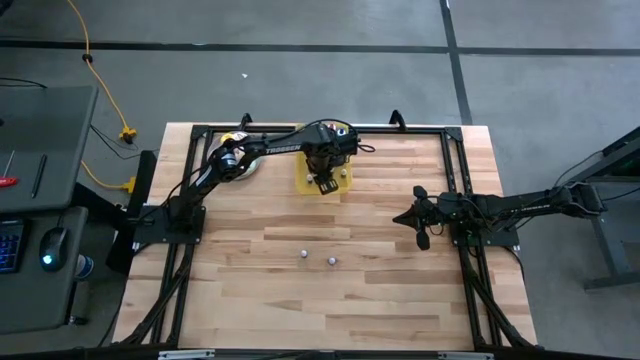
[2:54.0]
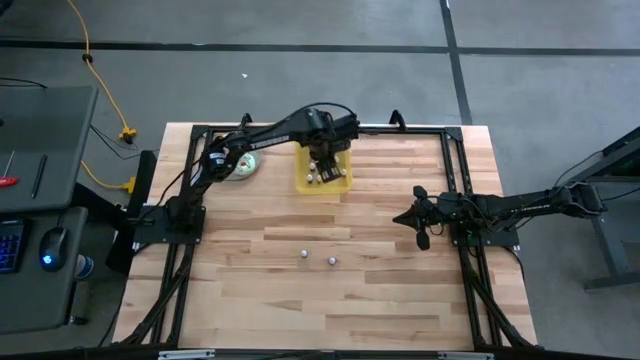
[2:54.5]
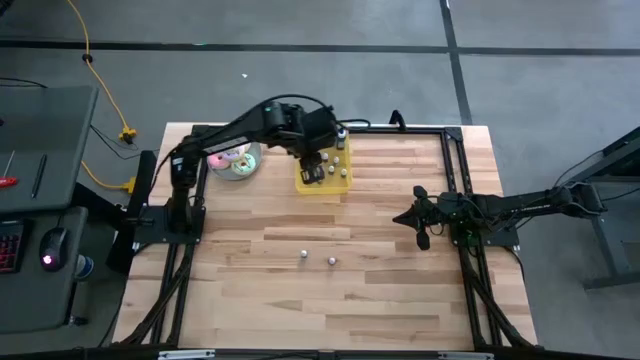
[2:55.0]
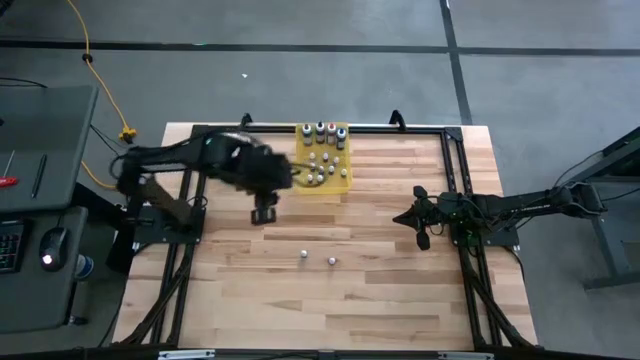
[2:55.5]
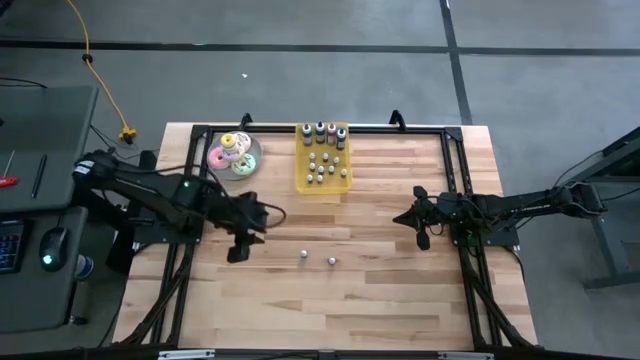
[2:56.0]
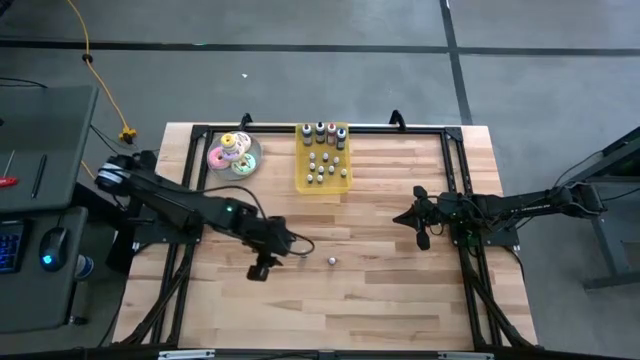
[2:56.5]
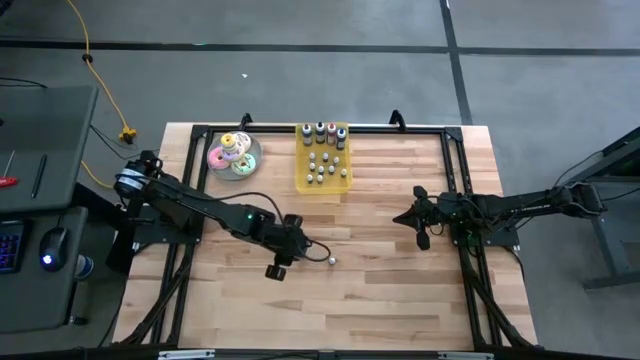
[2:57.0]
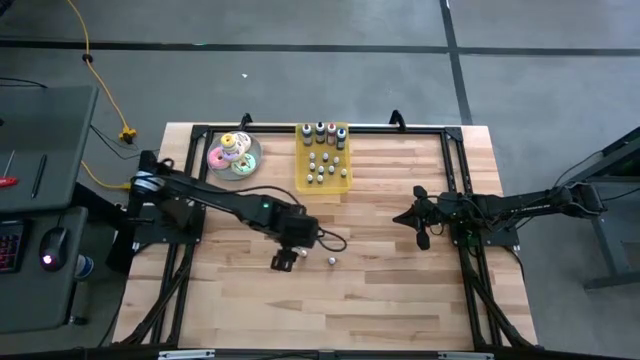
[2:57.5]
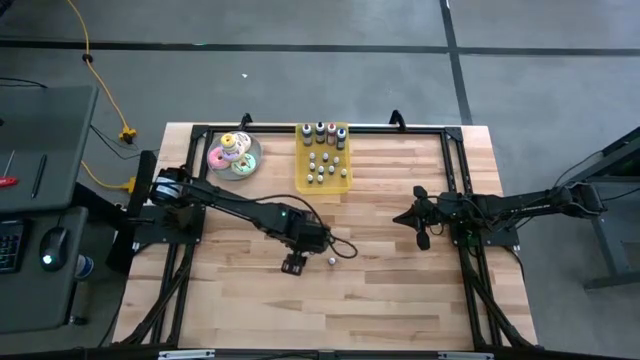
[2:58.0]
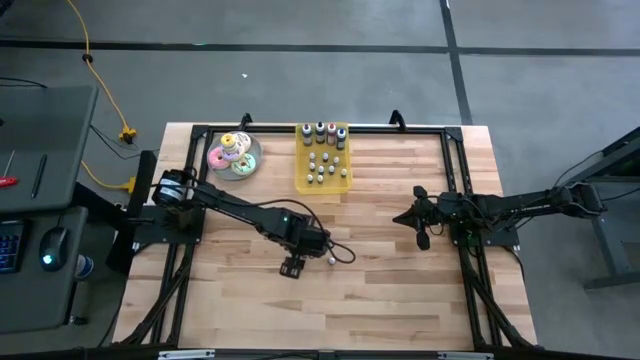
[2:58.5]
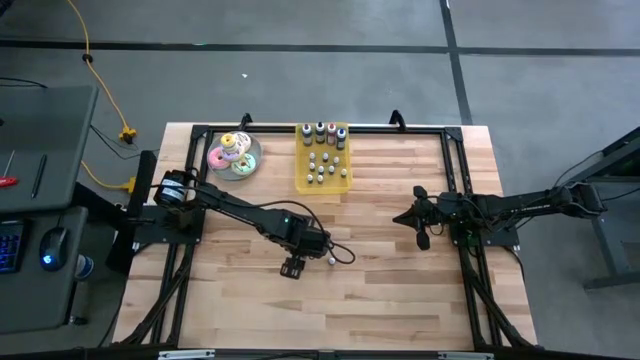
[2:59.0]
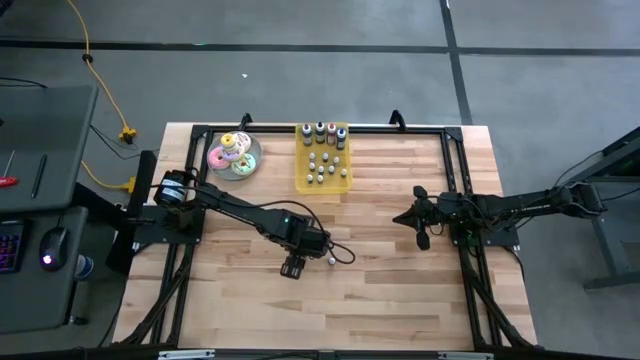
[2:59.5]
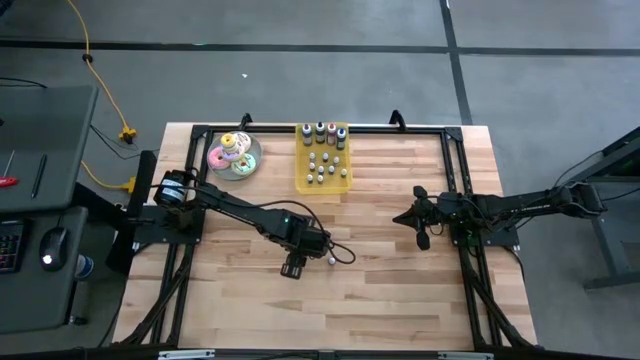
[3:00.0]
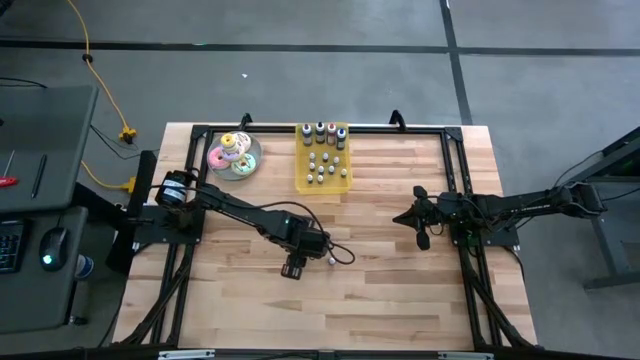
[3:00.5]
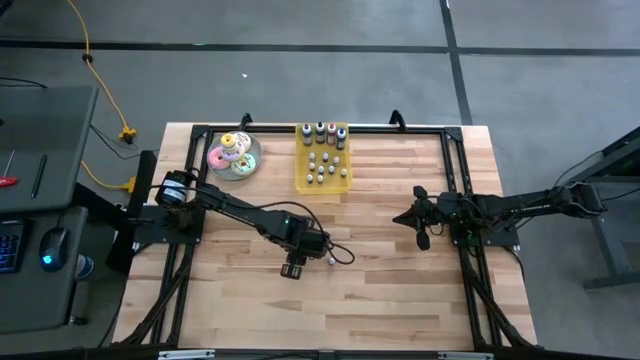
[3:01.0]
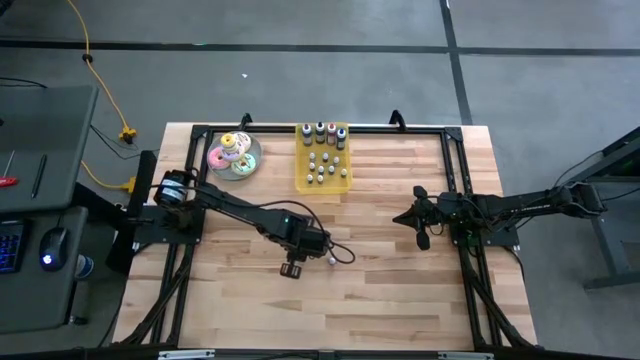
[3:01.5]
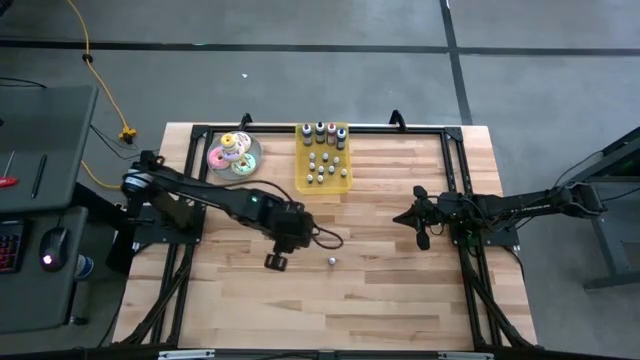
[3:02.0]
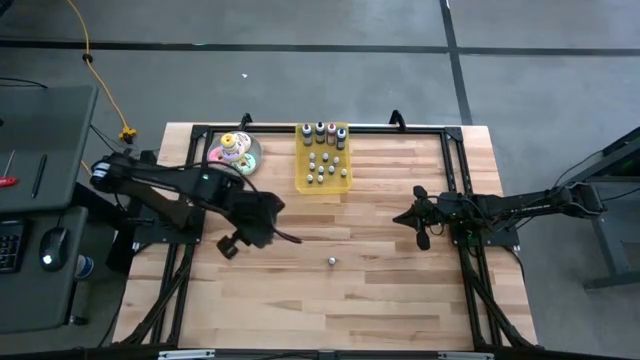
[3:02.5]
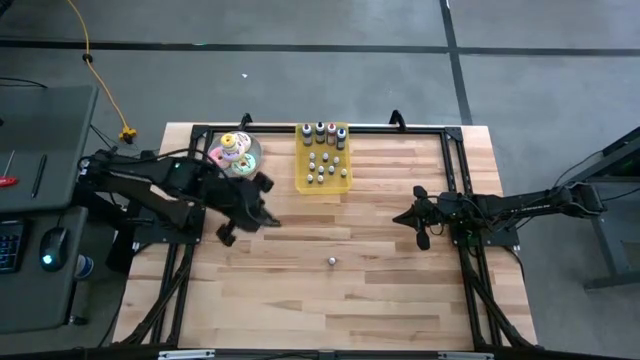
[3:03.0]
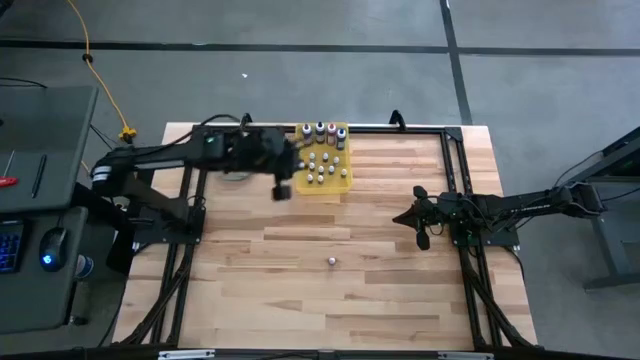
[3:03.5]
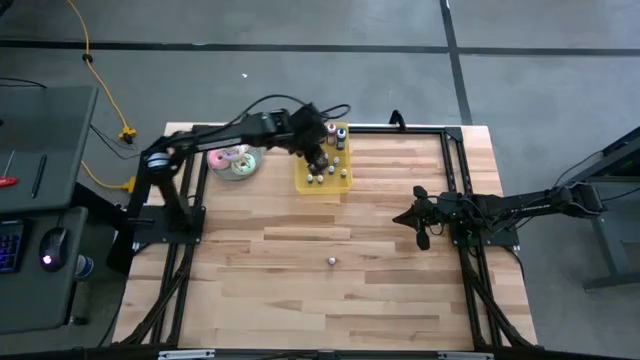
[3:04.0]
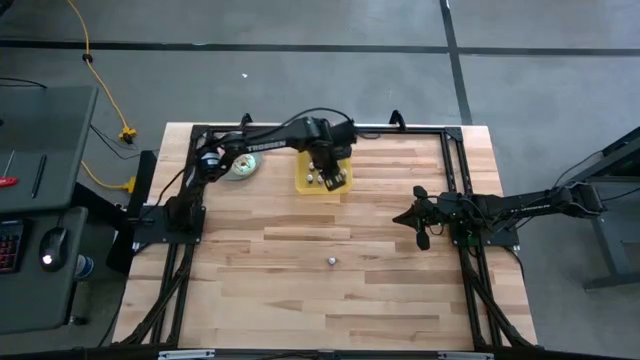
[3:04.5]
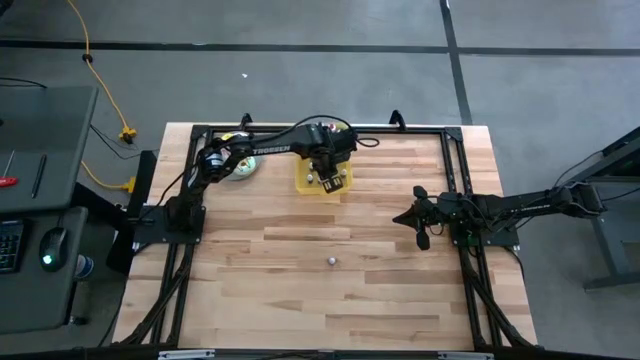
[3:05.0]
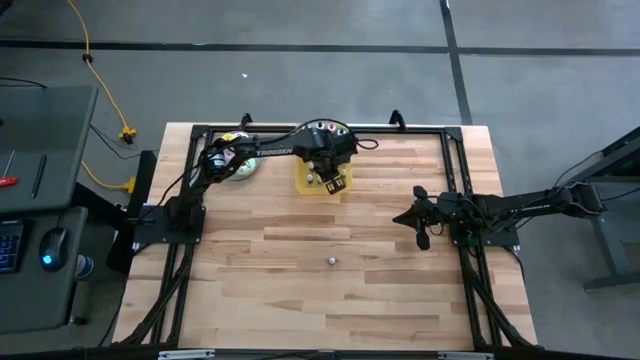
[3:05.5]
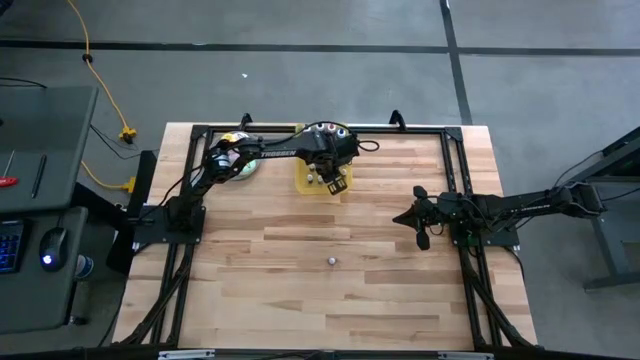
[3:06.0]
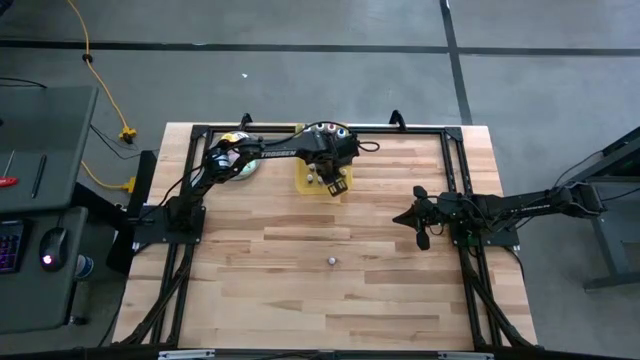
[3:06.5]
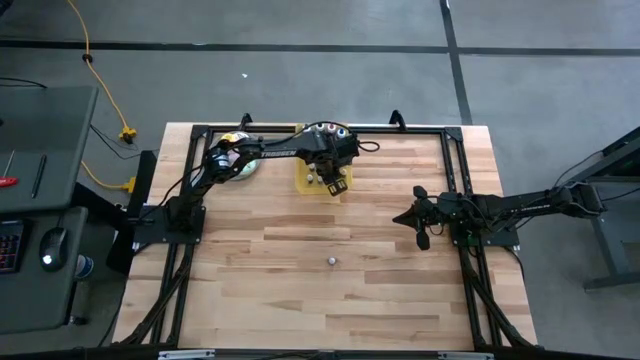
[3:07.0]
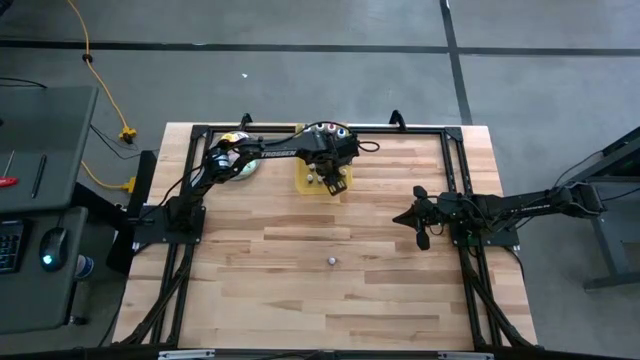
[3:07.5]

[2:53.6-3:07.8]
Task: Pick & Place food coloring
Put the small light green food coloring bottle into the yellow bin

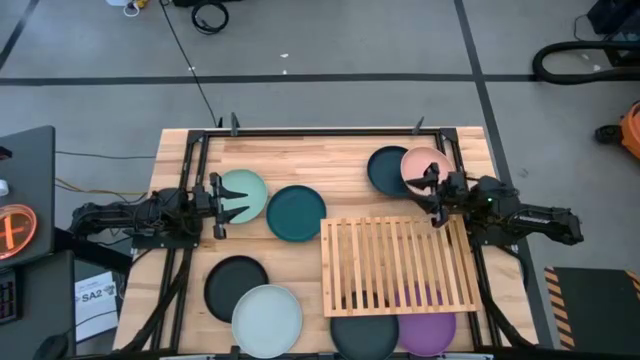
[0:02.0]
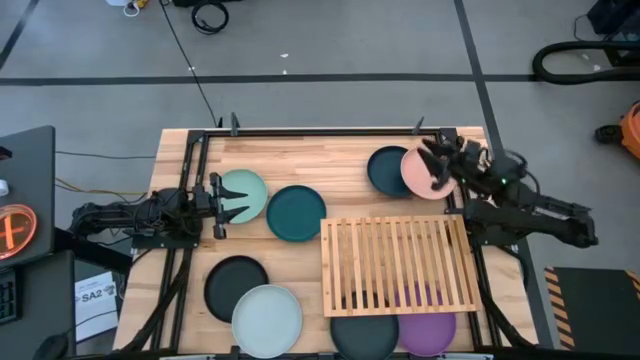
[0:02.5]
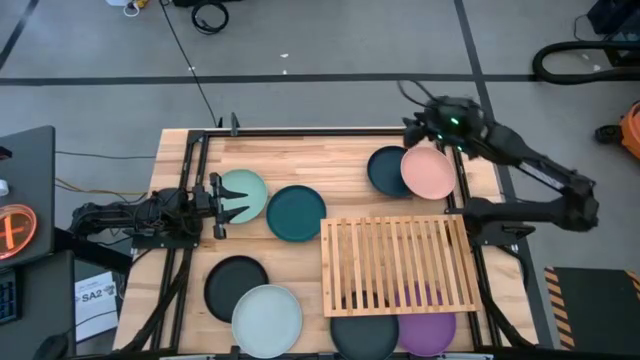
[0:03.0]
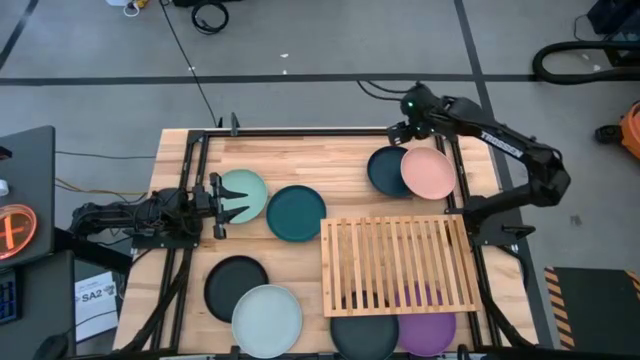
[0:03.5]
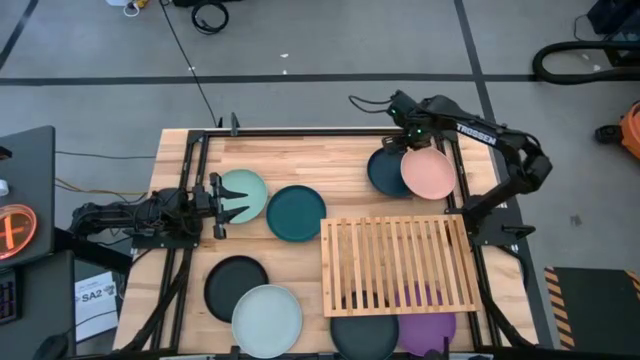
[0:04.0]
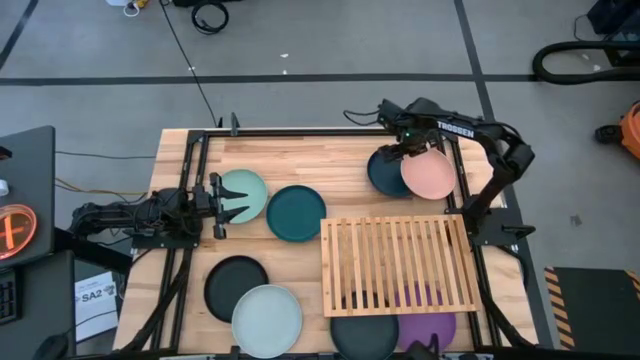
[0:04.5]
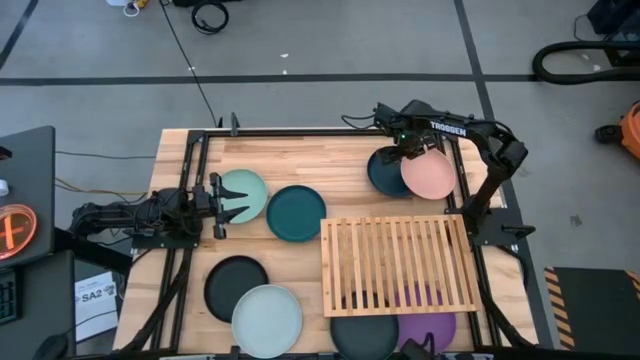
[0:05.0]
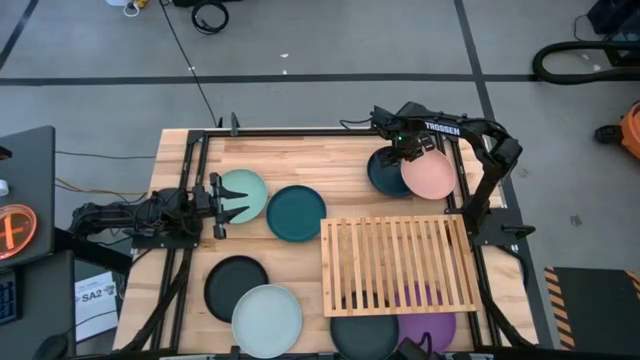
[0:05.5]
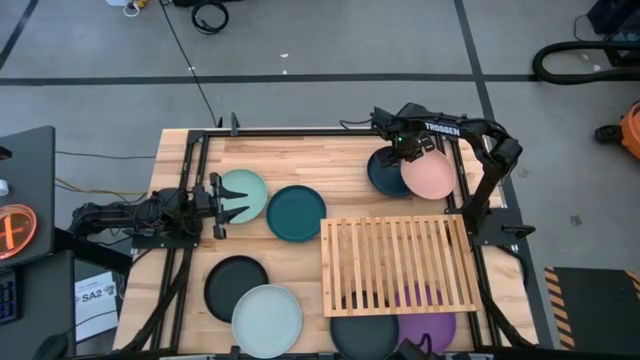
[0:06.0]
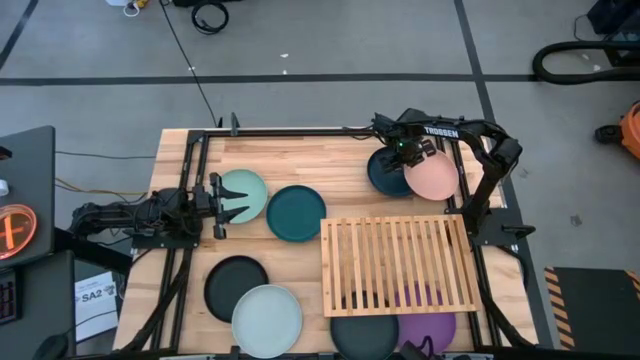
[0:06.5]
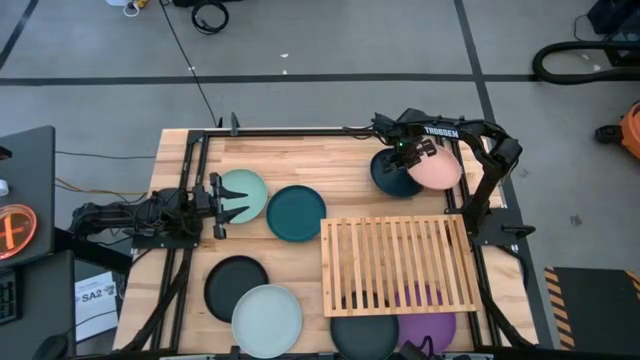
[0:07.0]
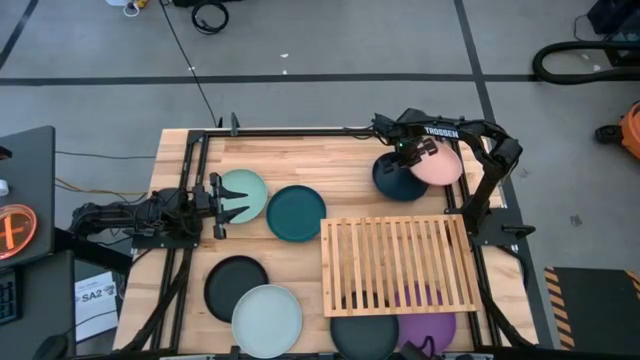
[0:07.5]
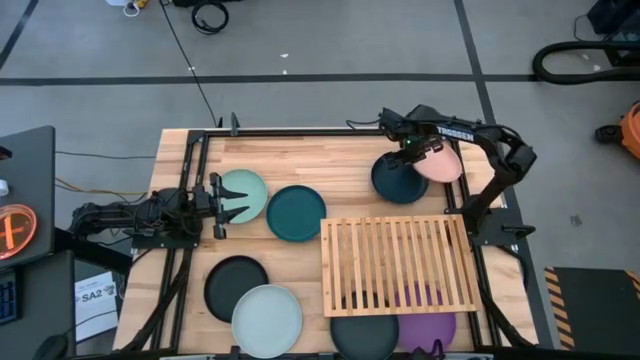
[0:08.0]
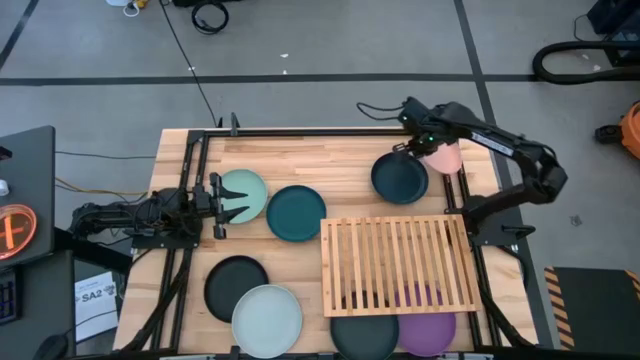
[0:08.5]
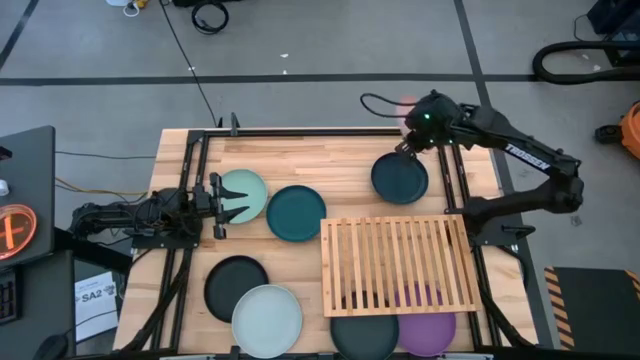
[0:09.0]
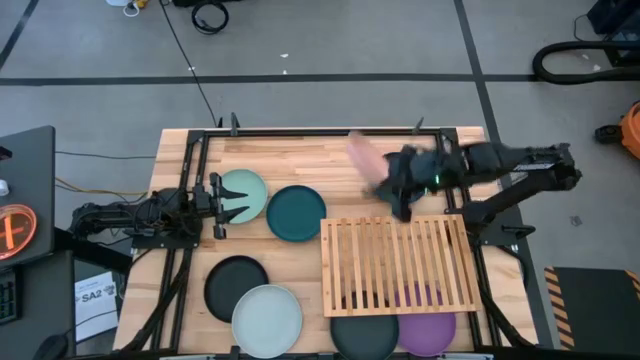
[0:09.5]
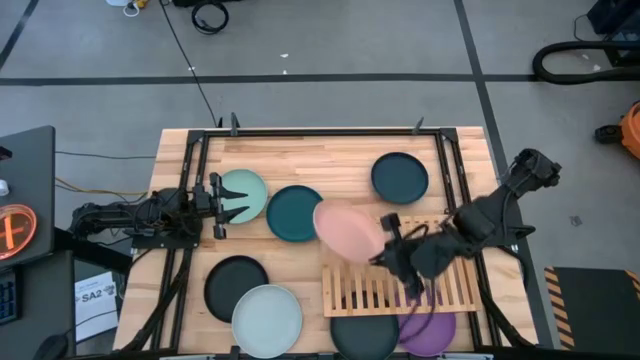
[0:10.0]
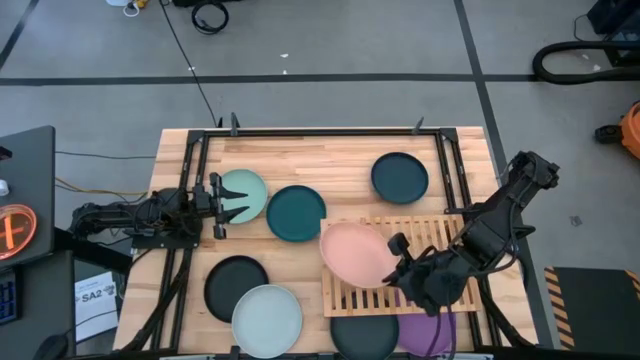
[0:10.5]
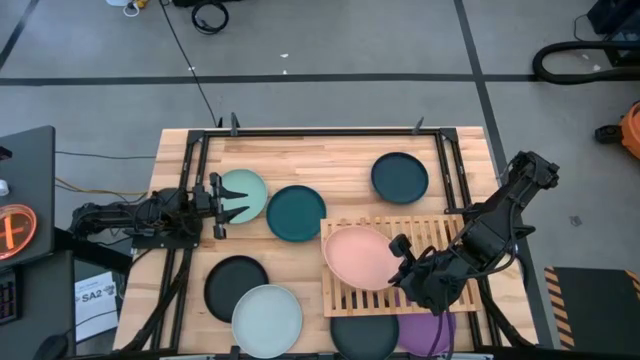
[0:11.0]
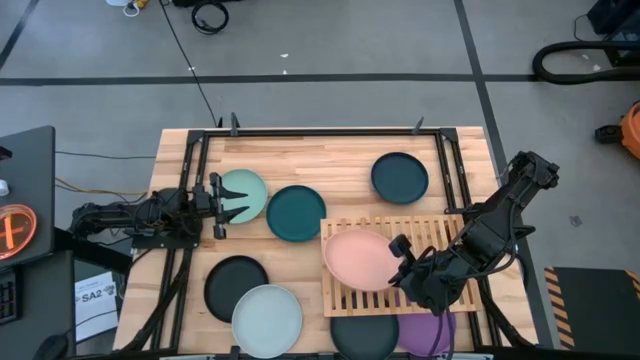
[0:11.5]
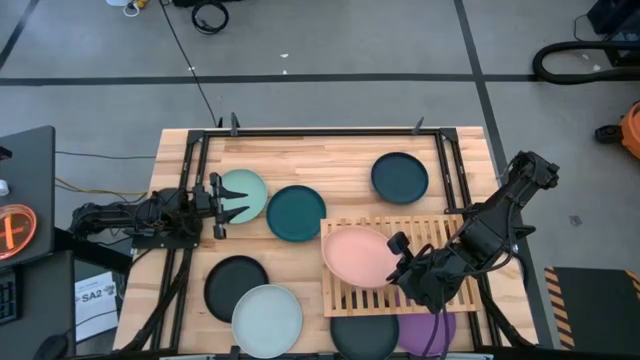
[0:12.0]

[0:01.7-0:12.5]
Task: Place and stack plates onto a shelf
Put the pink plate on the shelf
